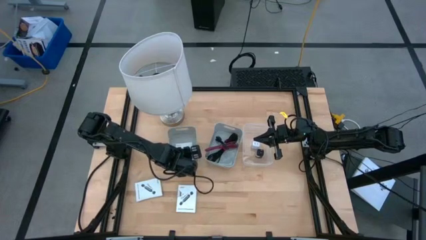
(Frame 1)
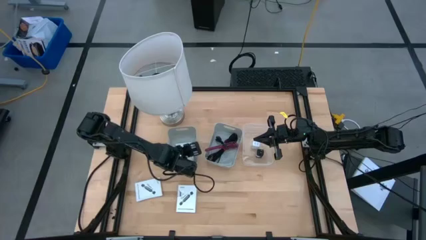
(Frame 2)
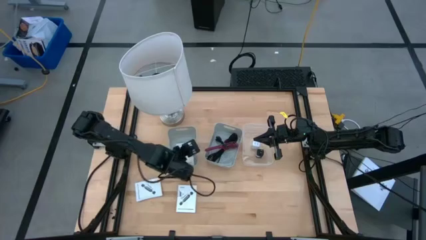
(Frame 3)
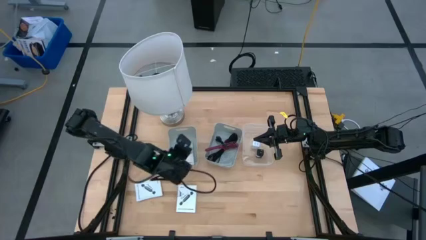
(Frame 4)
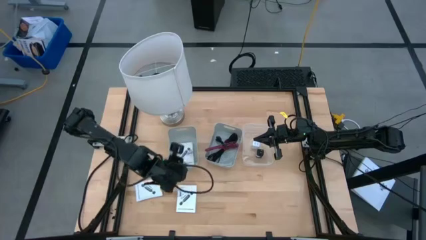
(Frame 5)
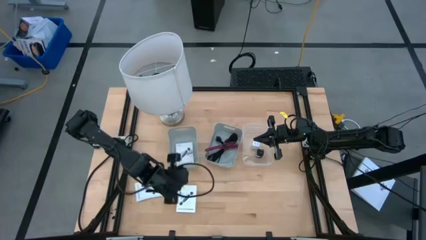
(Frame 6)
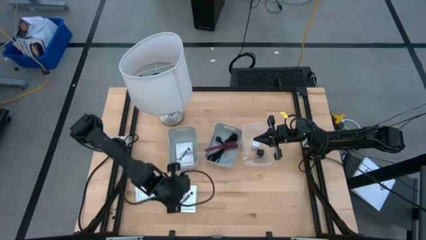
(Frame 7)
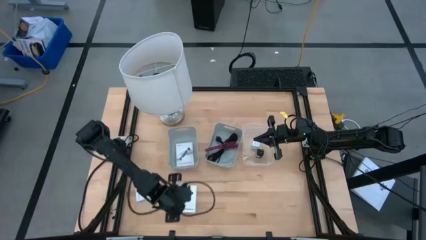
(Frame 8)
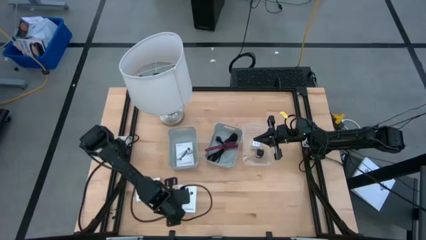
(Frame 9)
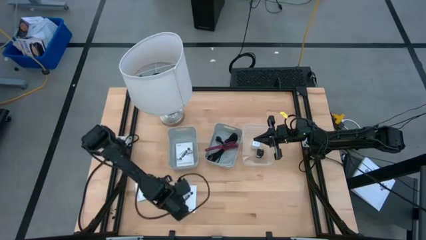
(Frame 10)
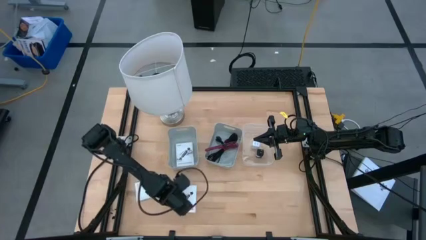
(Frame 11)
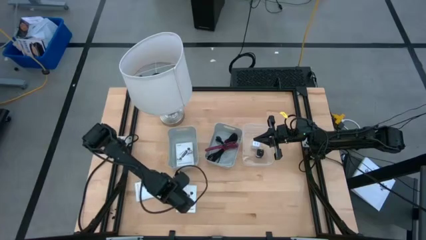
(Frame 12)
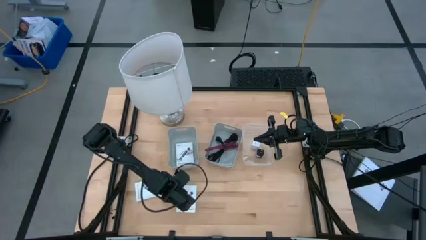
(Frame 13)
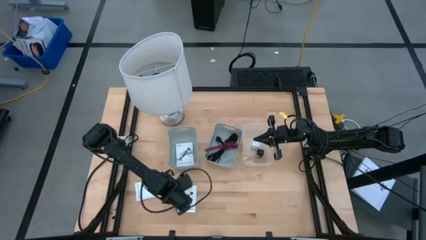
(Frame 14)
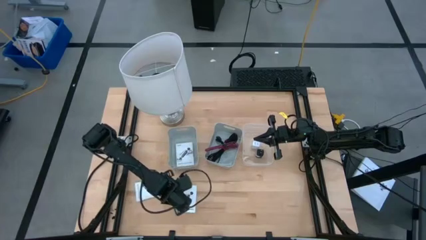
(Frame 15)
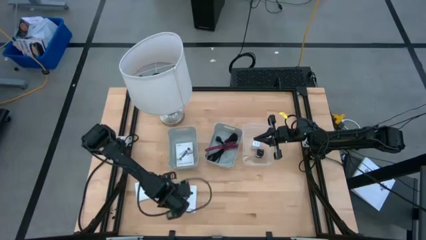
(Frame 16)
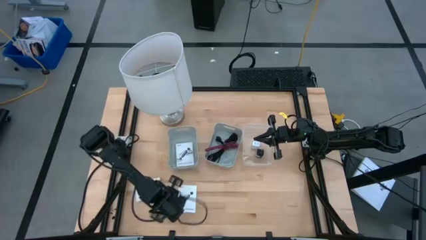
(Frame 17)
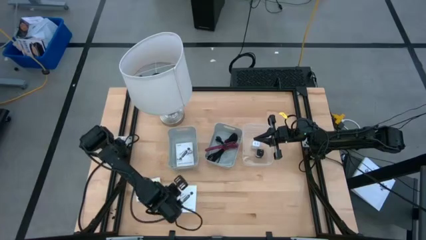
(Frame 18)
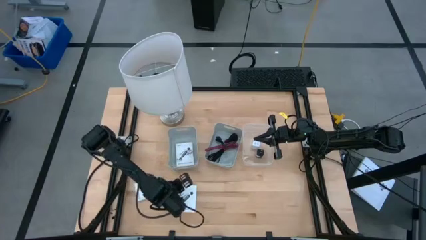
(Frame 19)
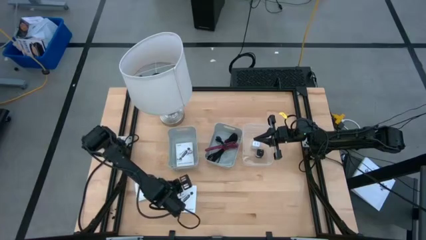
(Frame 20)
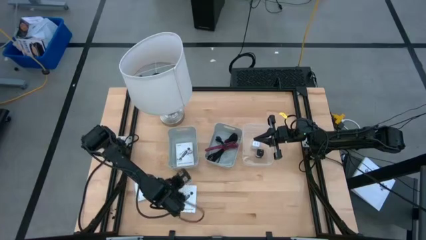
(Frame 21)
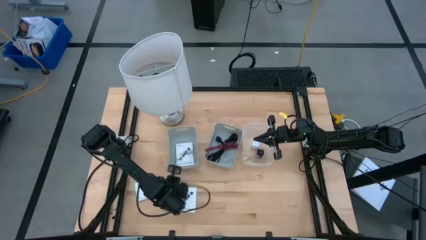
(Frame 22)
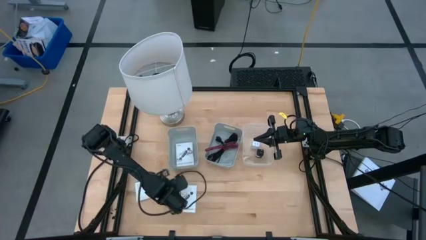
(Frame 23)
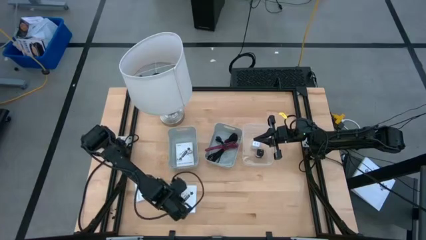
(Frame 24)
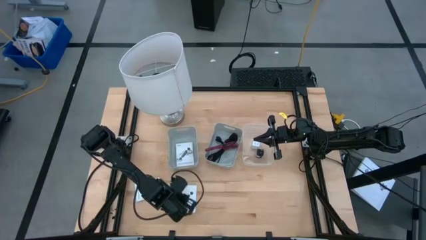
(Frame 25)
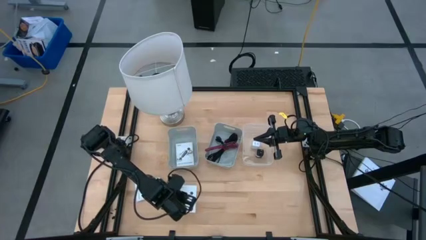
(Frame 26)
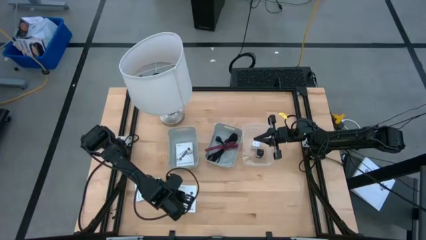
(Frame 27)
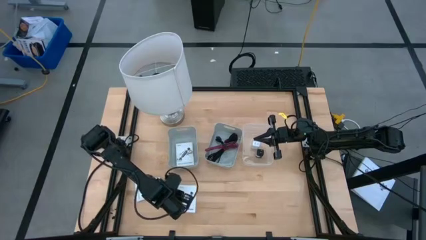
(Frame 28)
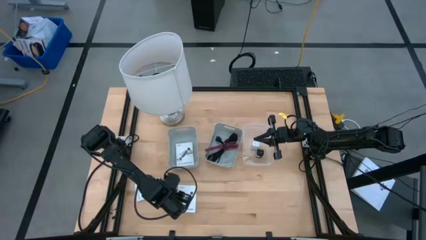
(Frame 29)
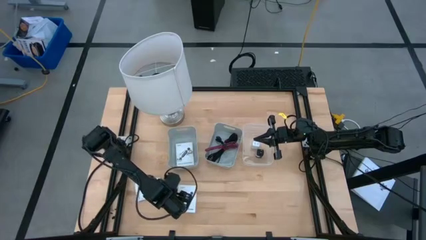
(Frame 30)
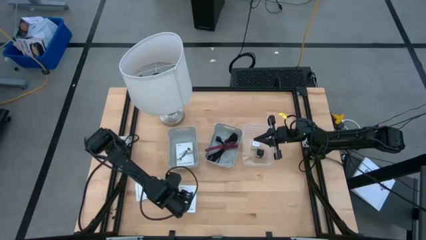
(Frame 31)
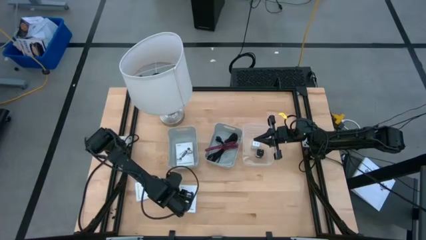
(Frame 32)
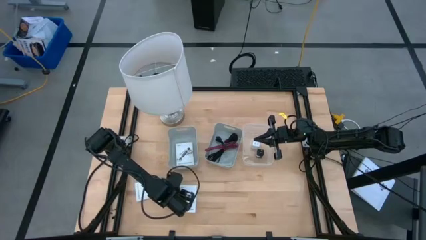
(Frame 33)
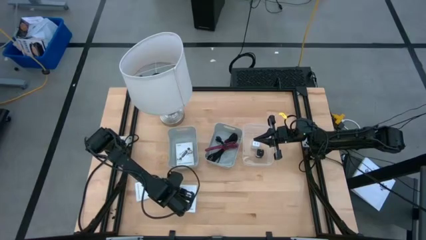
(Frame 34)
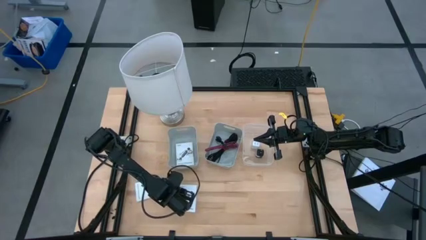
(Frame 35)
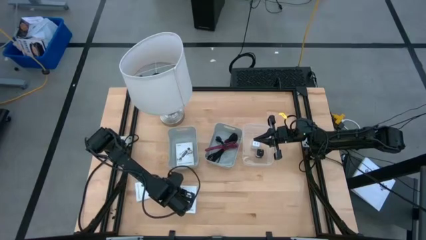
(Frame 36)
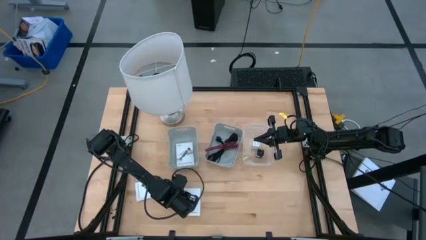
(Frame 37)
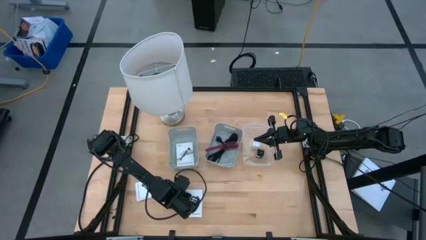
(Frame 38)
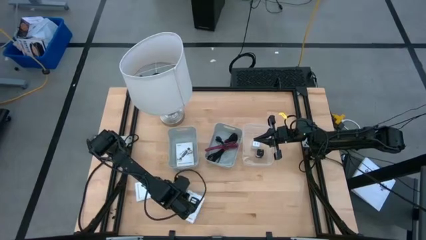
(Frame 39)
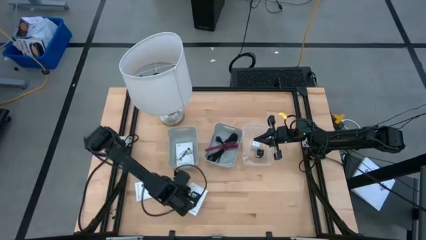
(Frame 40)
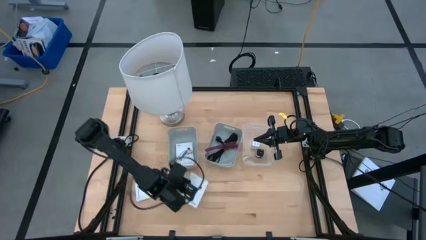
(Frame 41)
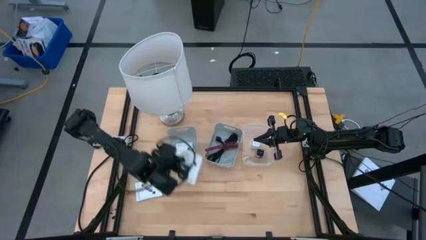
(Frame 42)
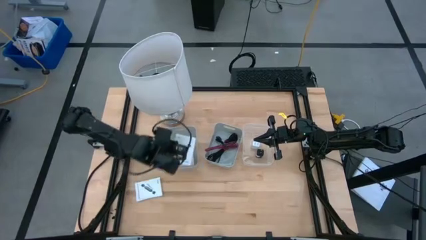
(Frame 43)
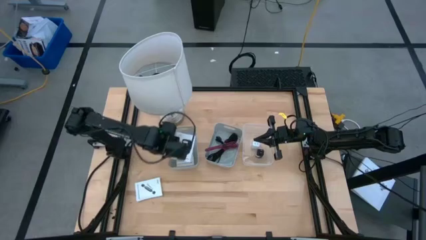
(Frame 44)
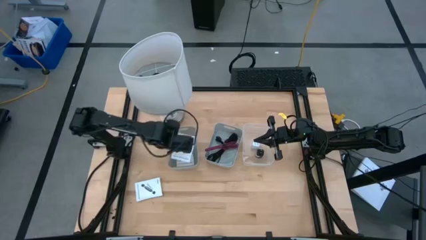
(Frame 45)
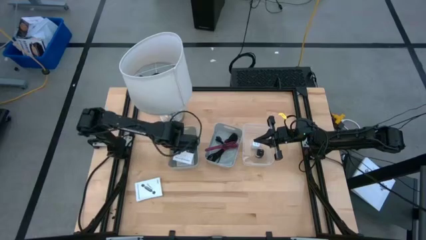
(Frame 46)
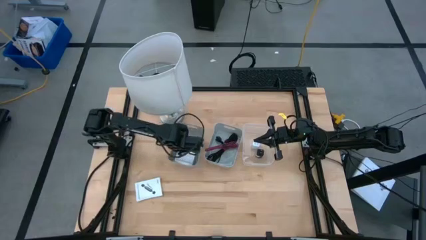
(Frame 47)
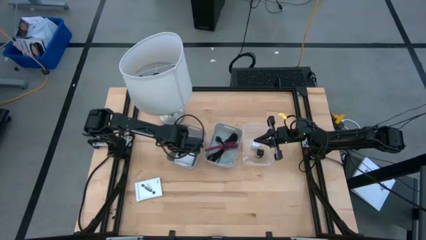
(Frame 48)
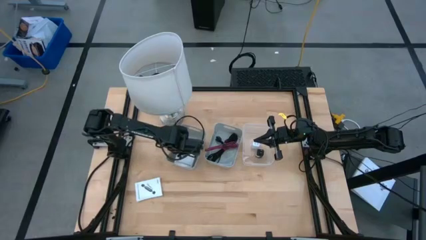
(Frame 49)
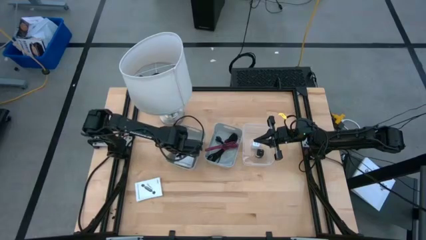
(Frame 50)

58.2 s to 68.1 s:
Task: Pick and place items into bin
Put the right card reader box into the left gray bin

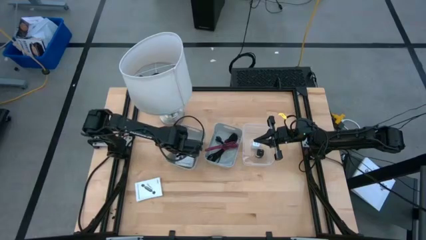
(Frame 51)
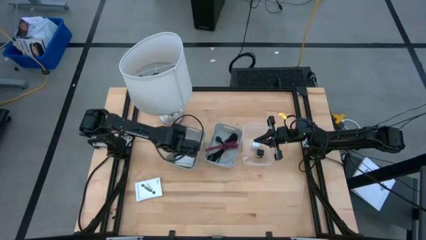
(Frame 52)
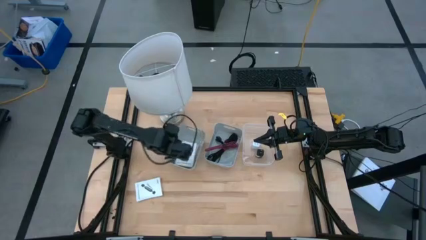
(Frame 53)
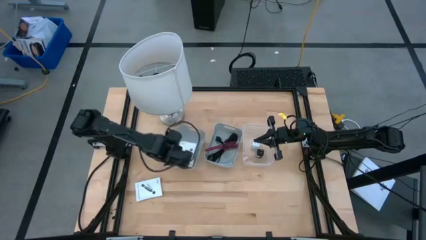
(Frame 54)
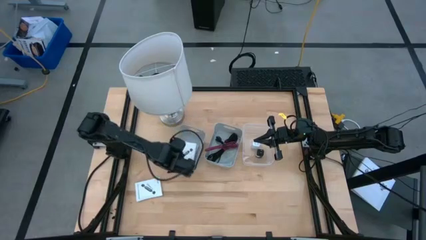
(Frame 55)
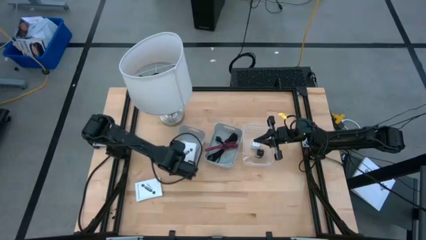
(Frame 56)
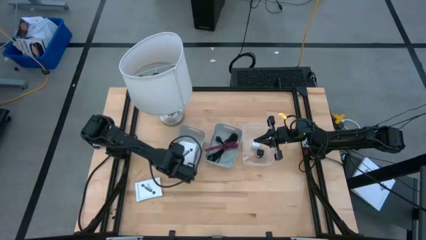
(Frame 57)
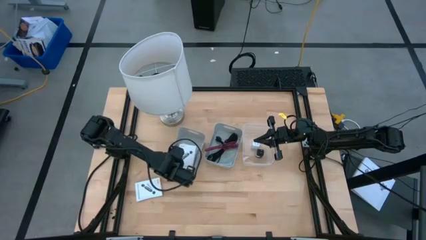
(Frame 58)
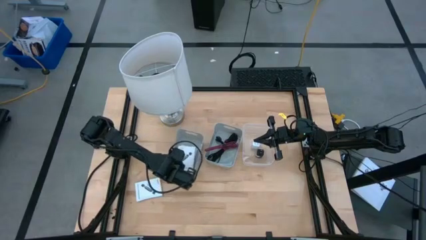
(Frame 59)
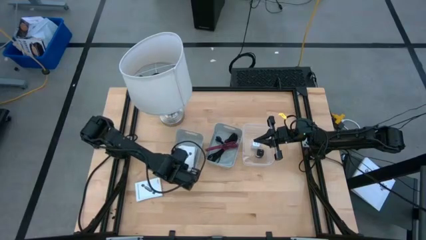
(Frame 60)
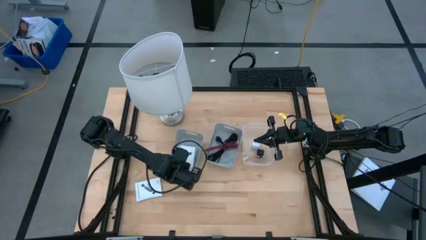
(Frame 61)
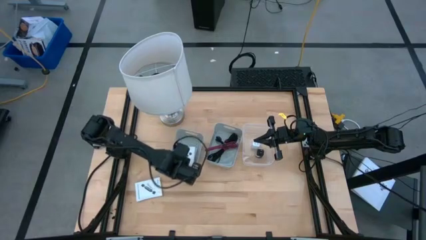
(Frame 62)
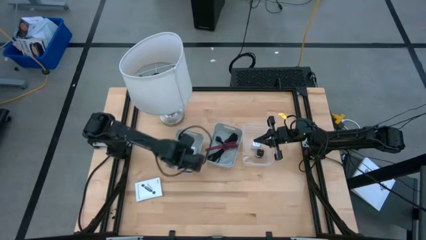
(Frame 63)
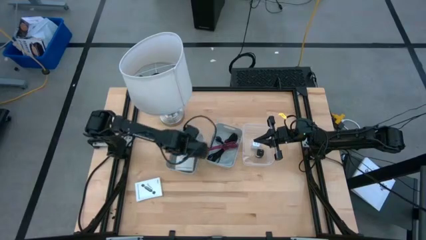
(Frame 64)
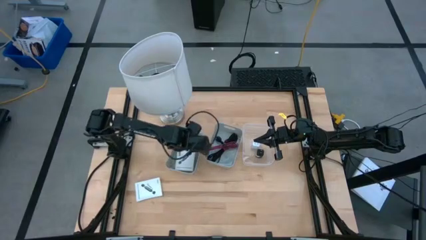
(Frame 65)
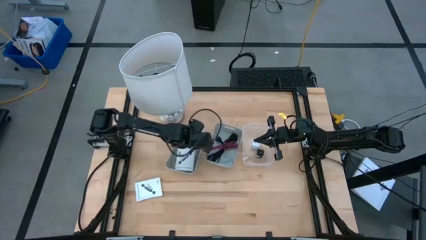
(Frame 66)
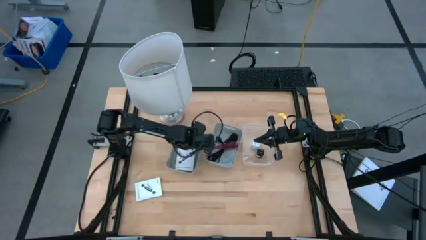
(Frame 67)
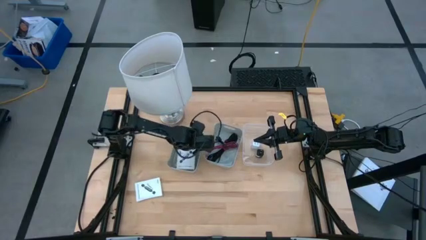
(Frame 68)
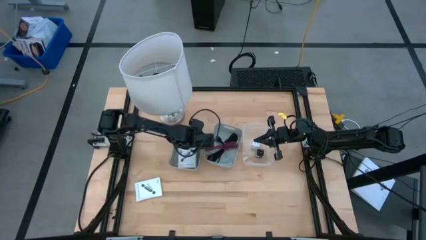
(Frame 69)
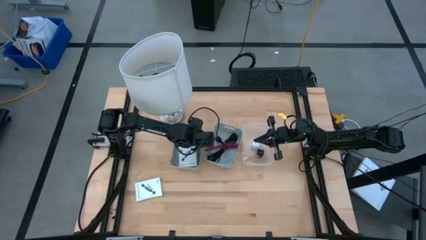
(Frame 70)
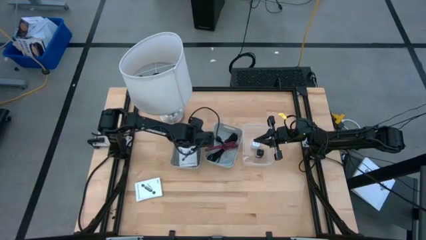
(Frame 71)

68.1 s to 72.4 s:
Adjust the left gray bin on the table
